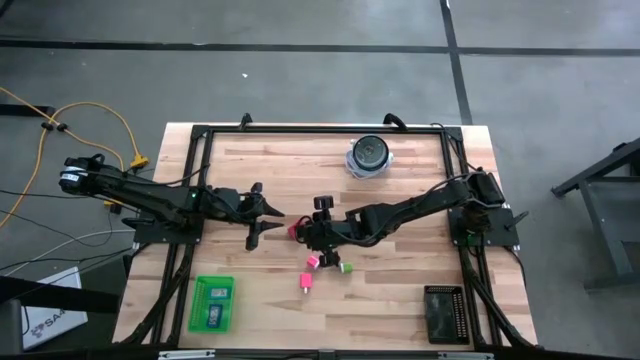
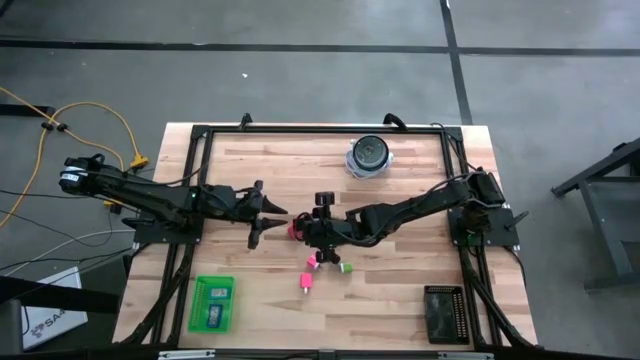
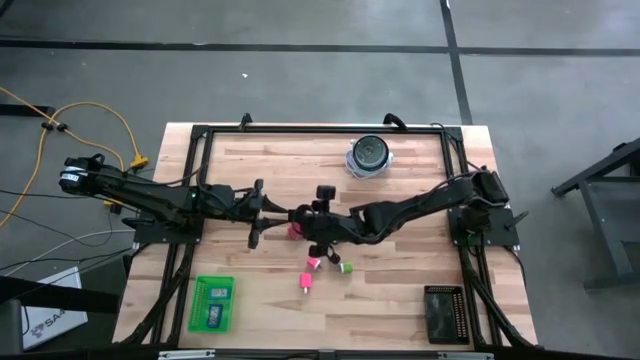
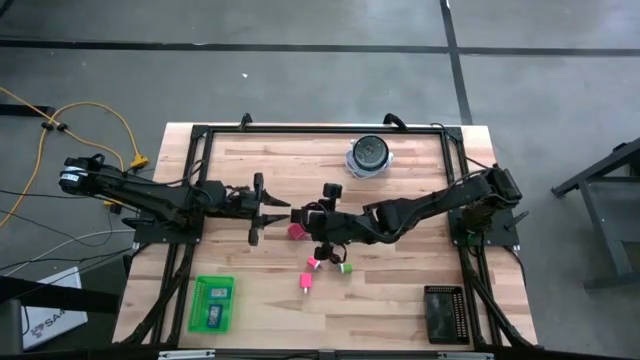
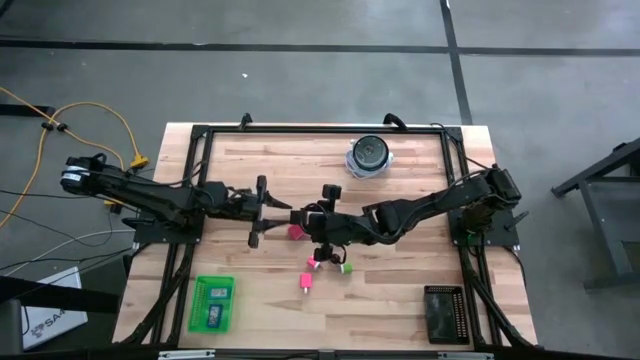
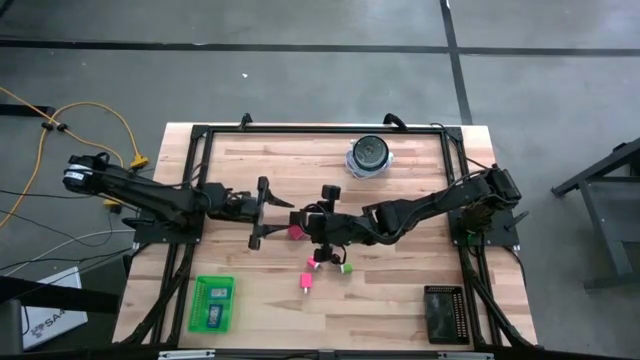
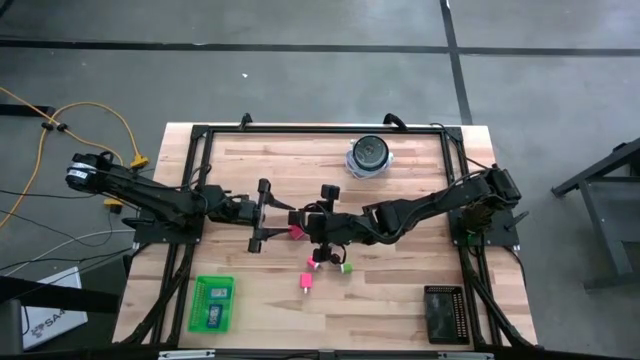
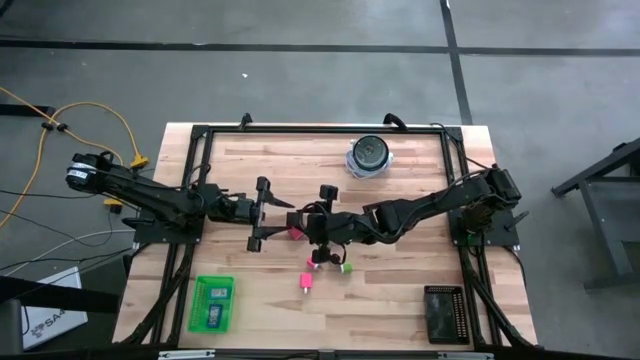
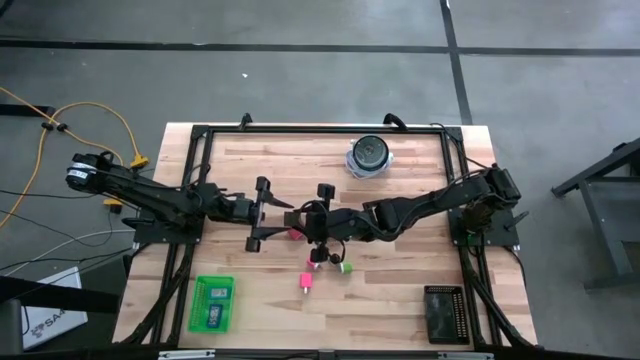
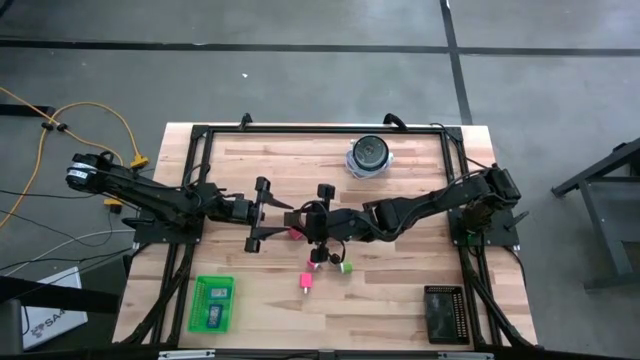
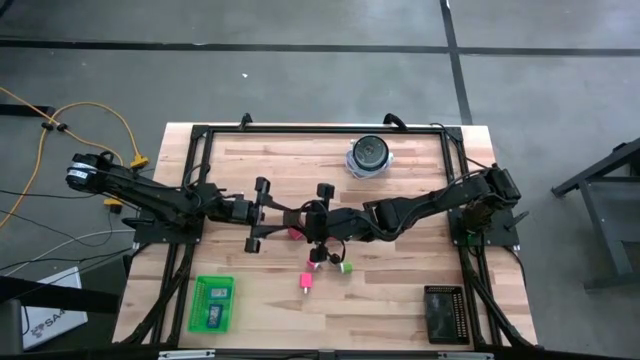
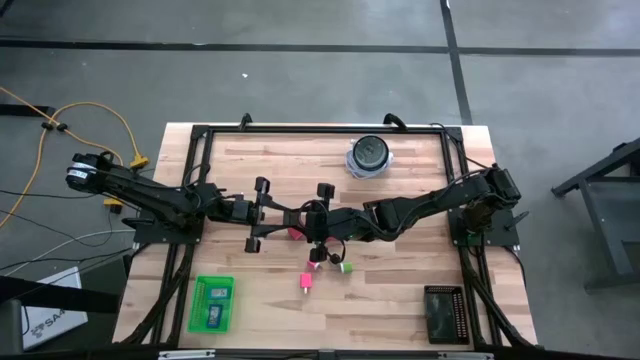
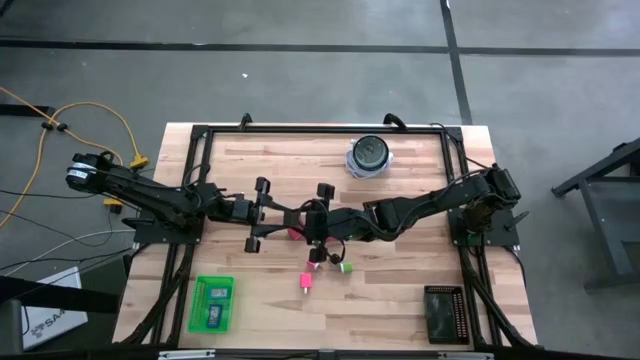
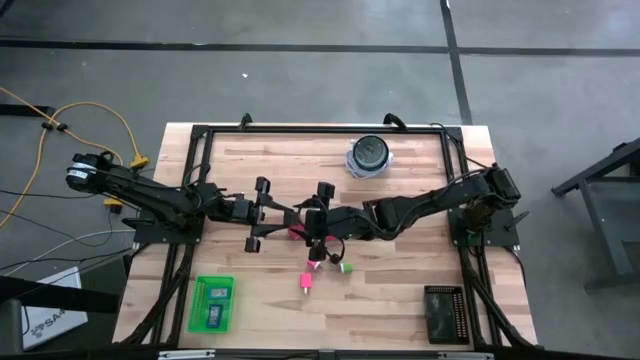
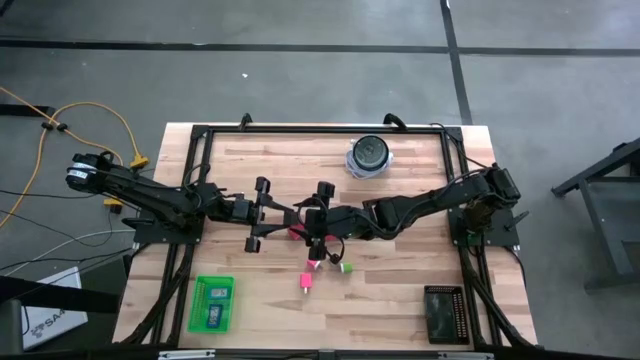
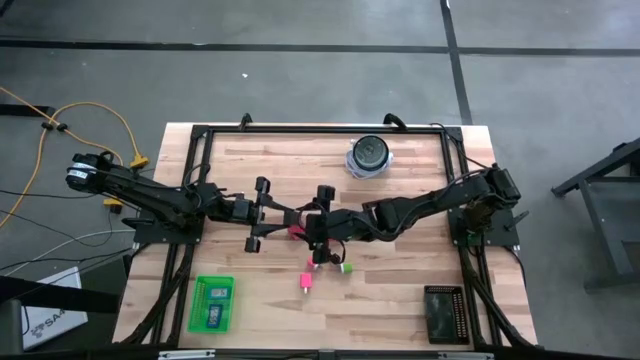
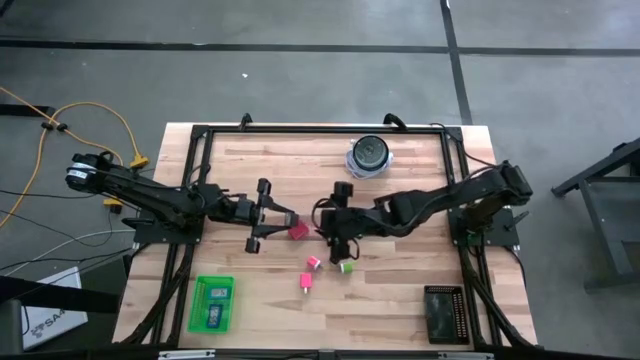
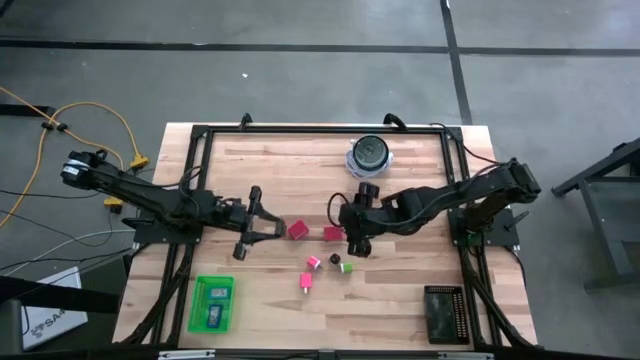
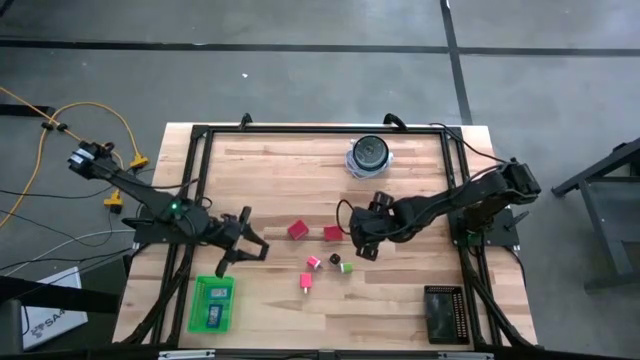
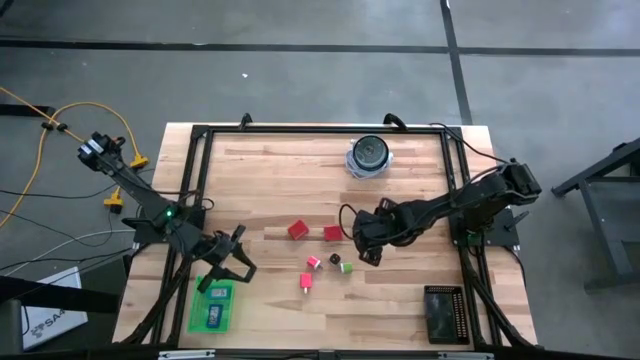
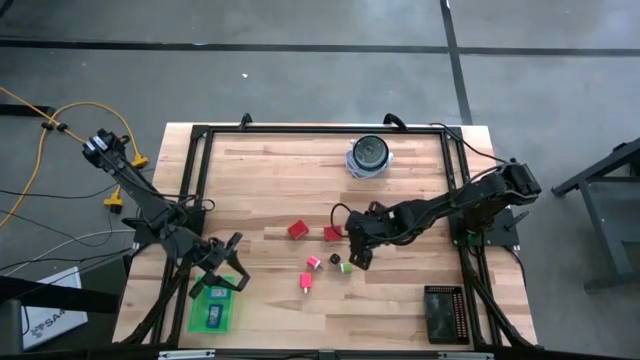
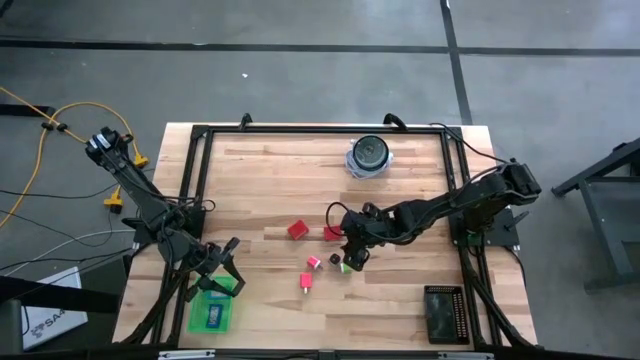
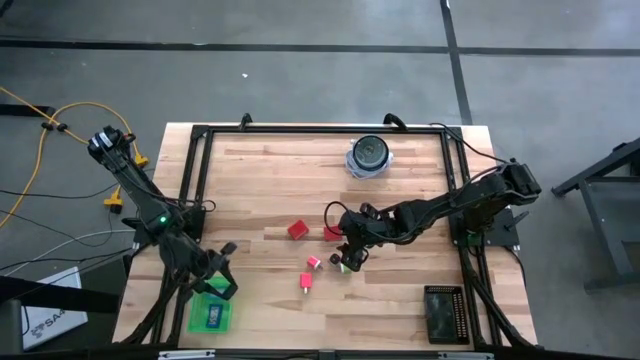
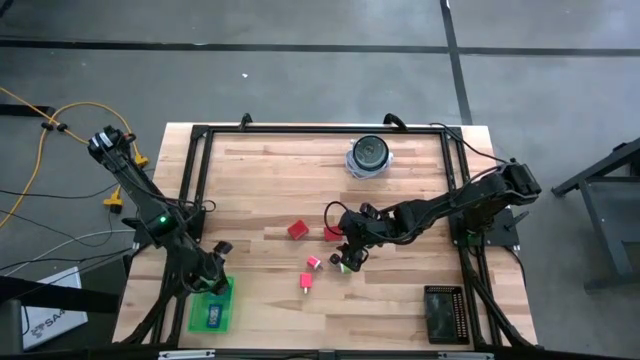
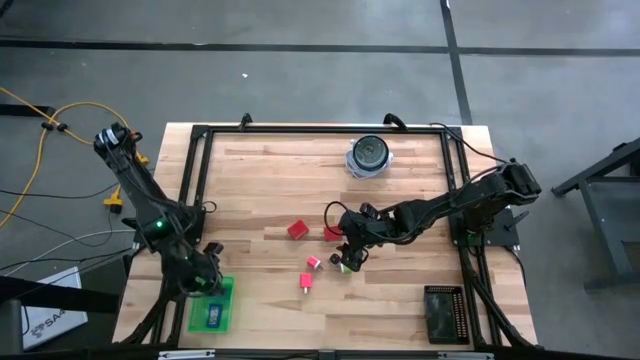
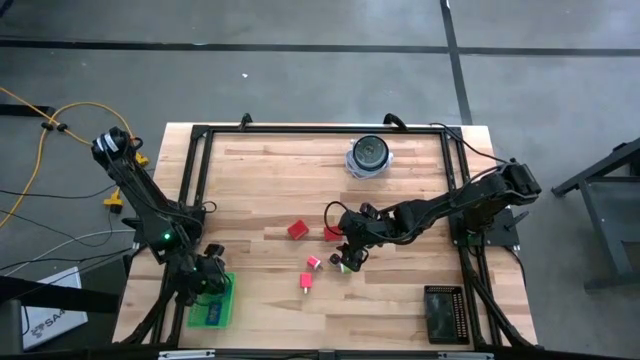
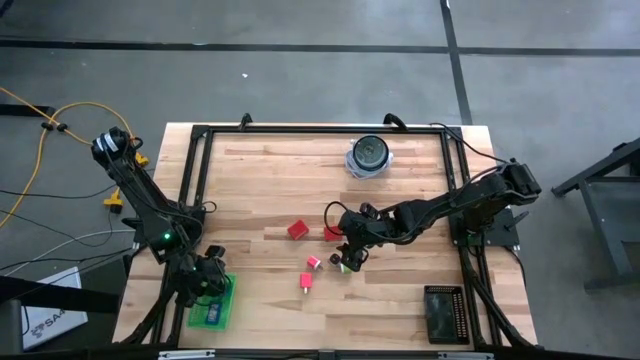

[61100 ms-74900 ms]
Task: Pick & Place Office items
Put the black digital timer into the green bin

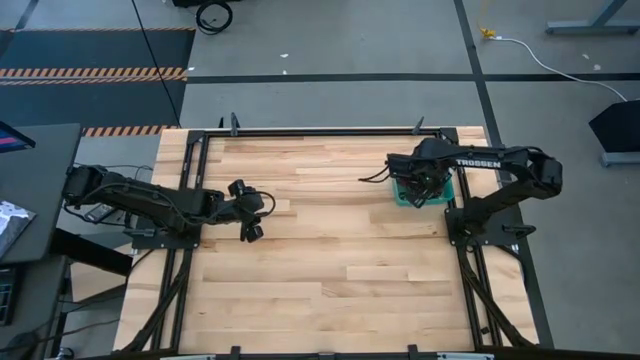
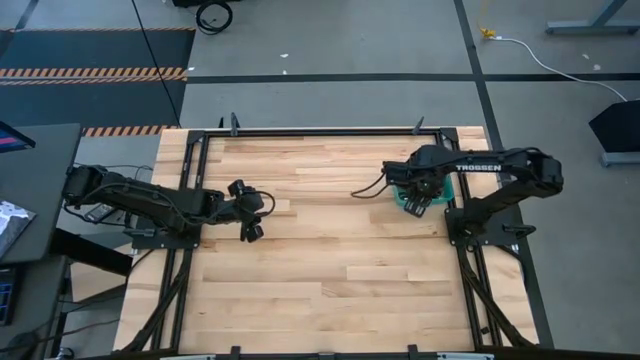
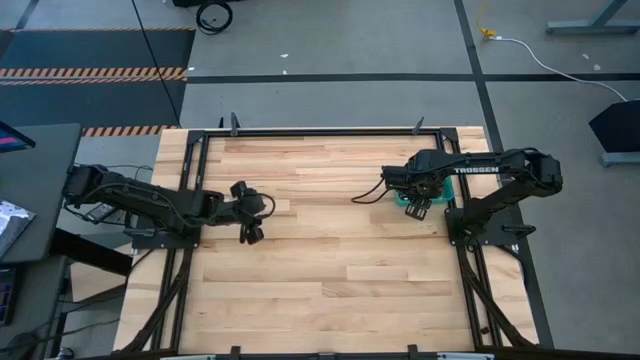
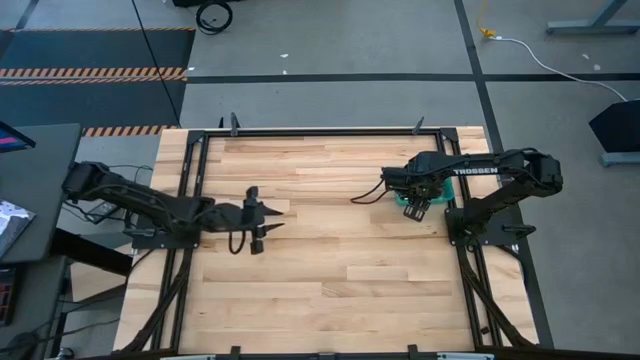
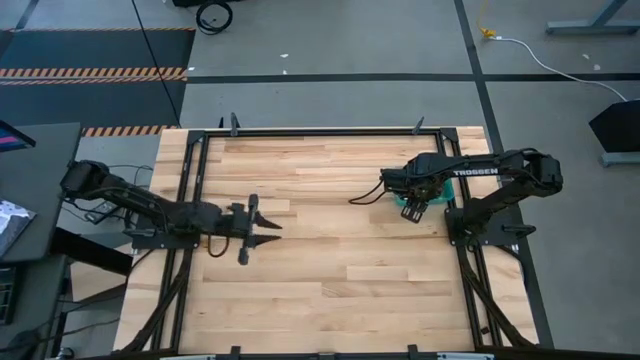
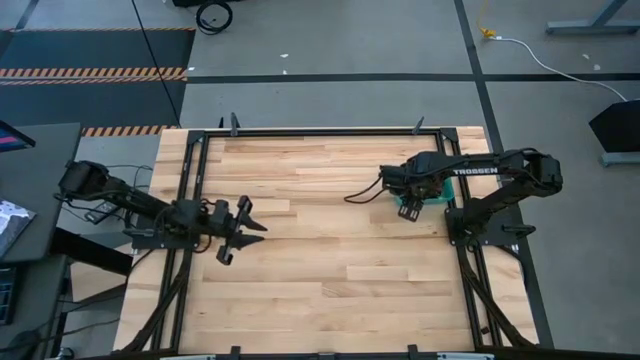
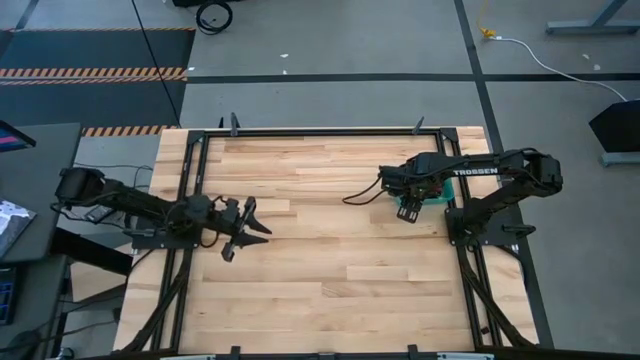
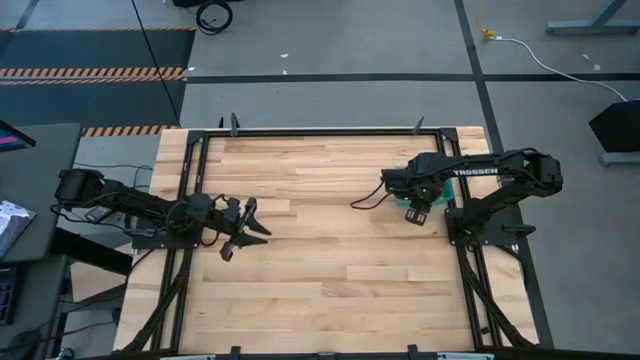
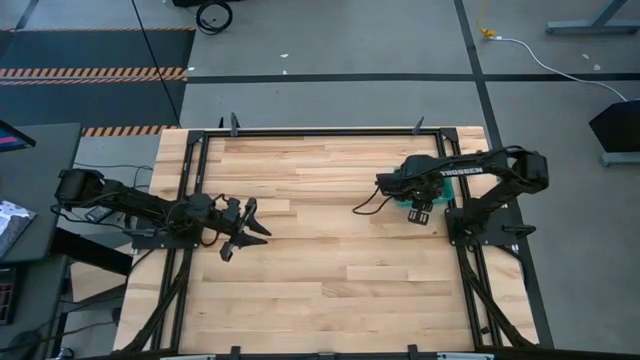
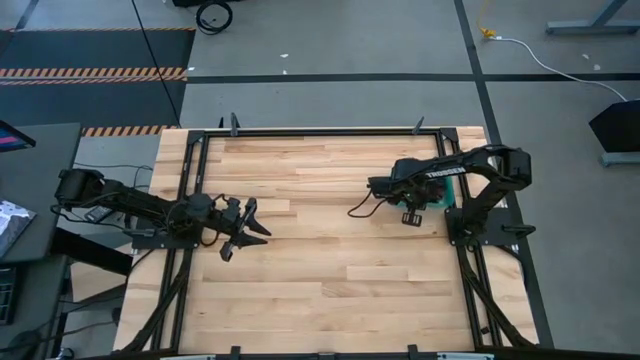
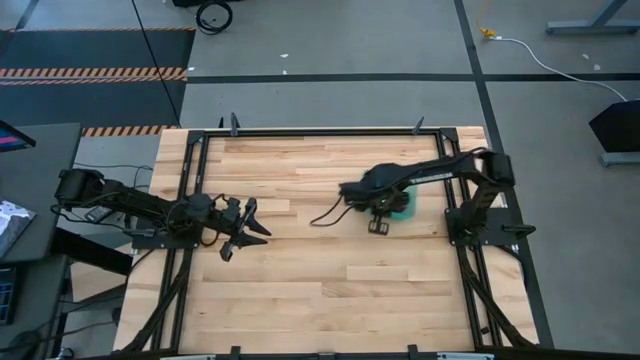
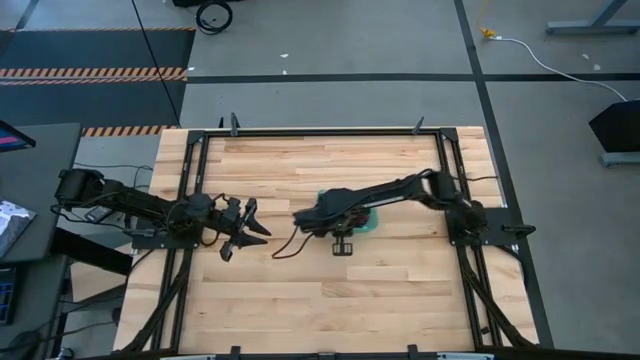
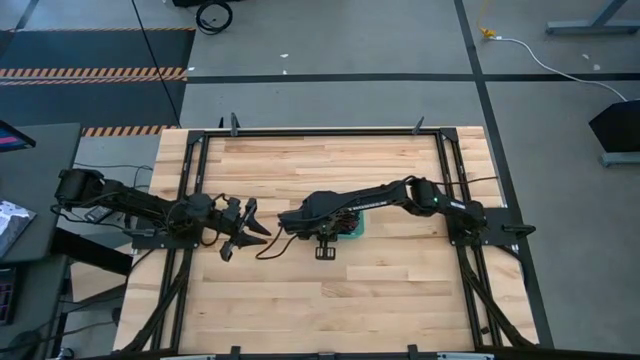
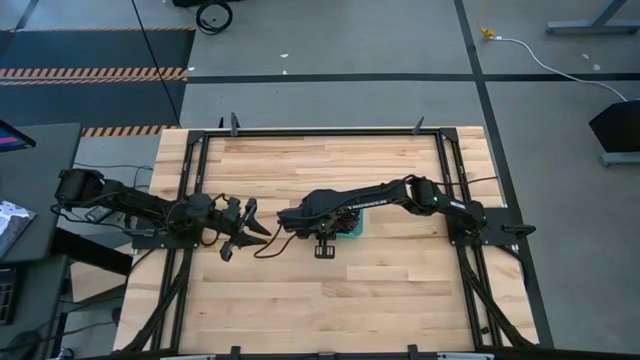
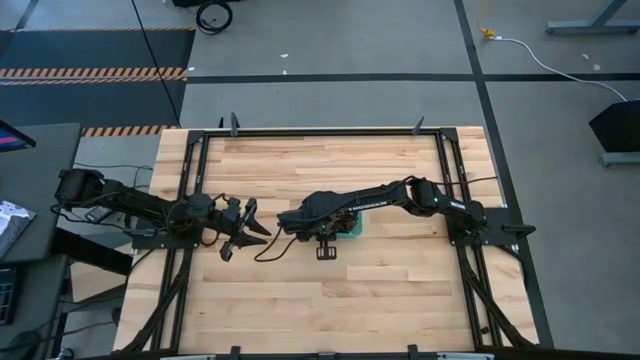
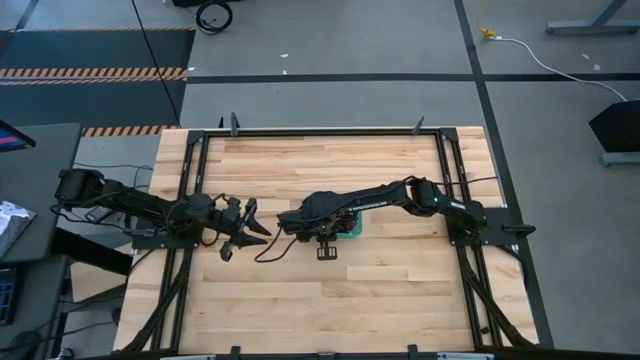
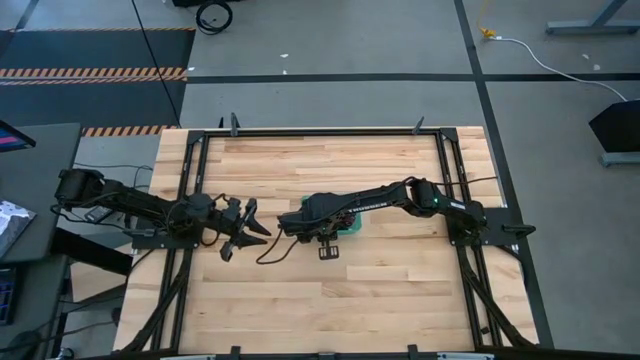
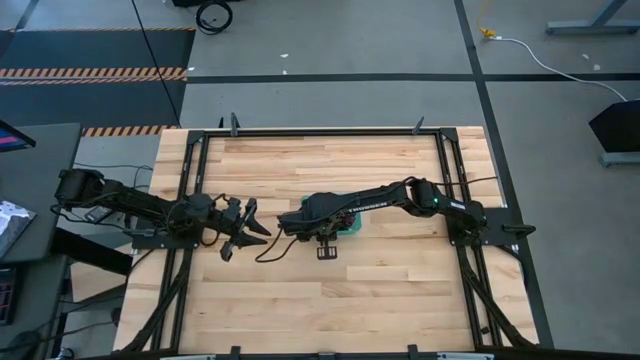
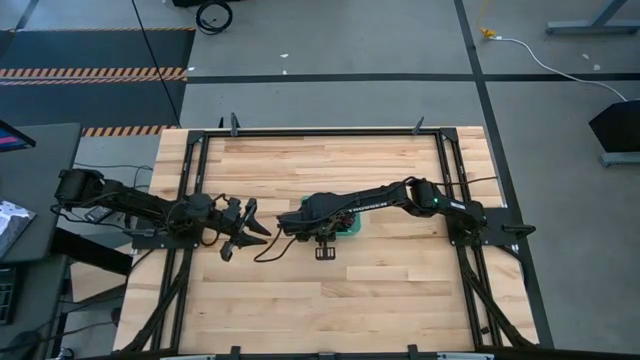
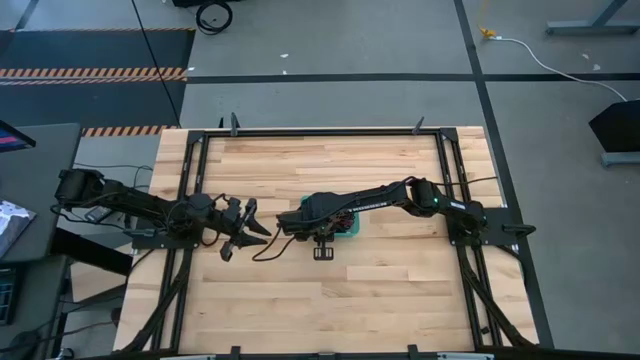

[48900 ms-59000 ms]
Task: Pick and place USB-C Cables
Move the bin from the top right to the center of the table
